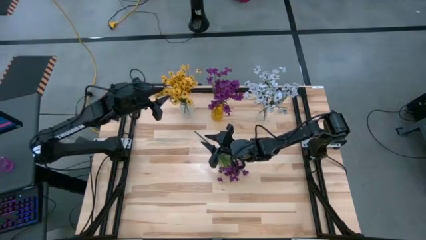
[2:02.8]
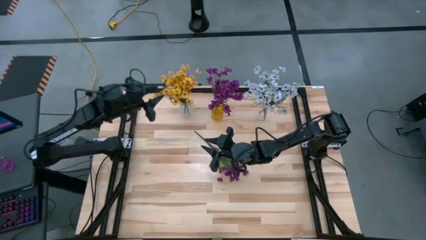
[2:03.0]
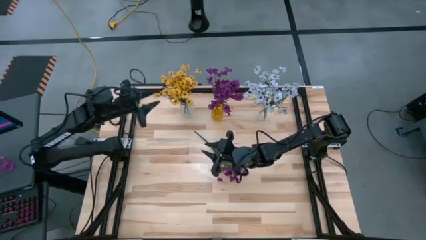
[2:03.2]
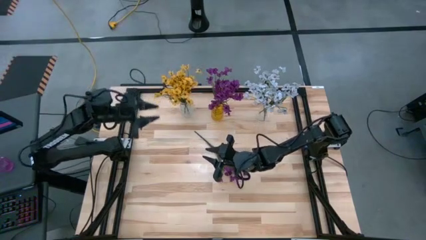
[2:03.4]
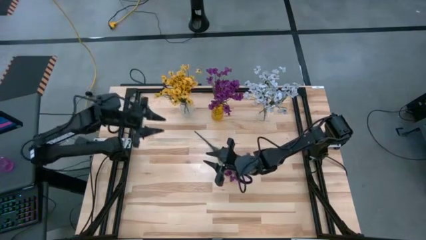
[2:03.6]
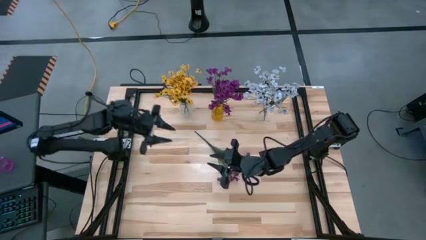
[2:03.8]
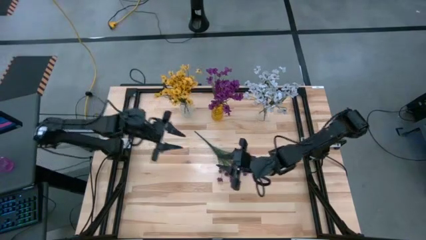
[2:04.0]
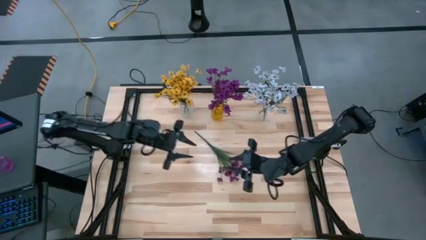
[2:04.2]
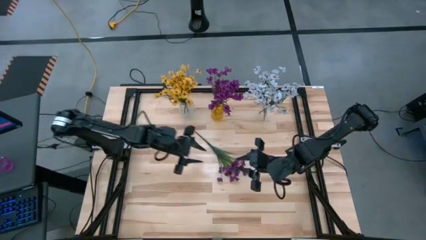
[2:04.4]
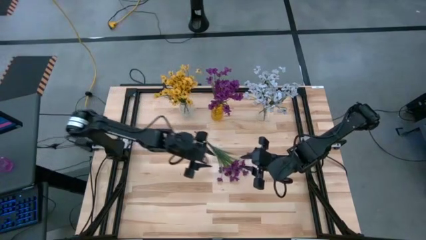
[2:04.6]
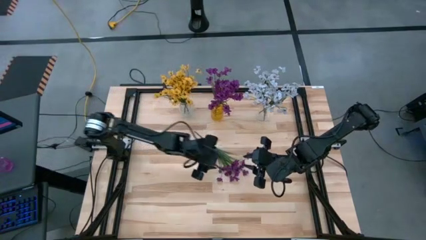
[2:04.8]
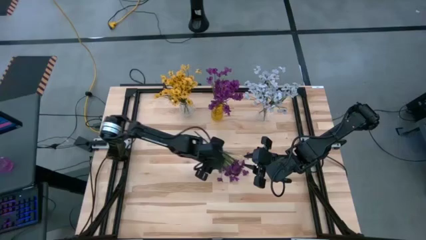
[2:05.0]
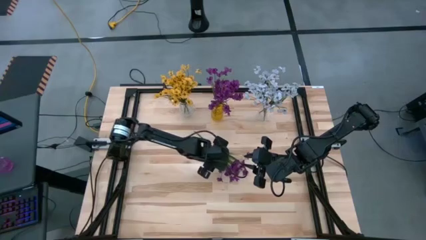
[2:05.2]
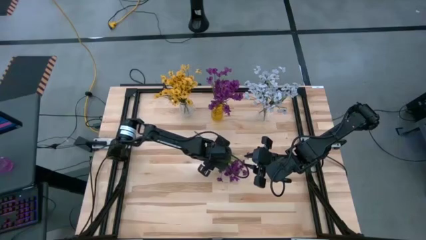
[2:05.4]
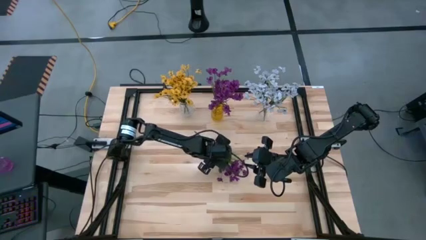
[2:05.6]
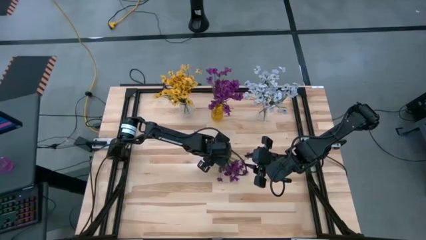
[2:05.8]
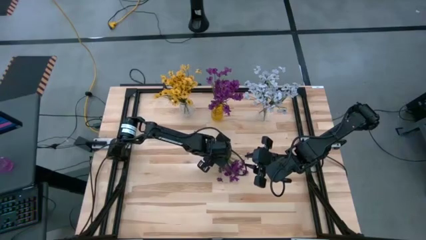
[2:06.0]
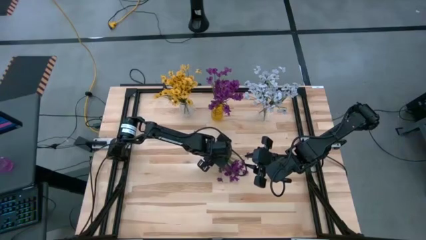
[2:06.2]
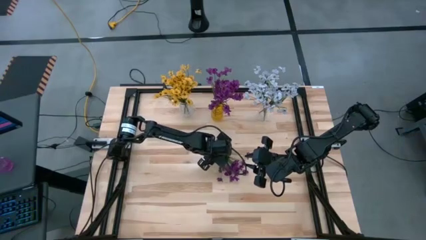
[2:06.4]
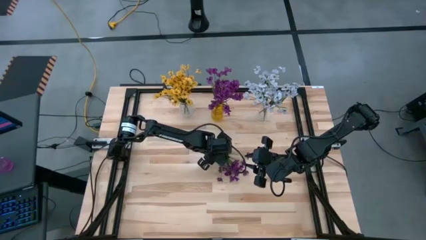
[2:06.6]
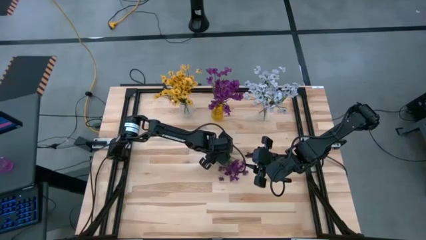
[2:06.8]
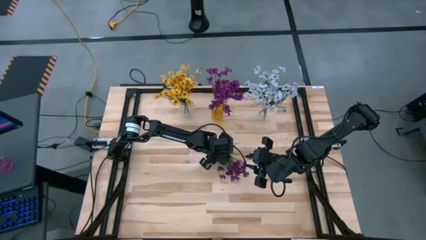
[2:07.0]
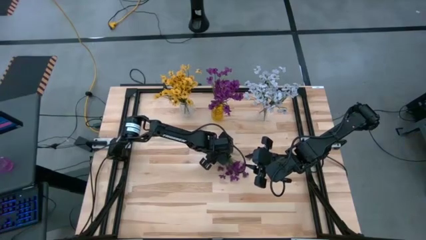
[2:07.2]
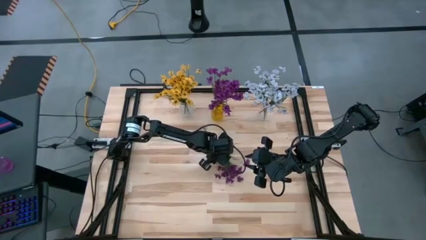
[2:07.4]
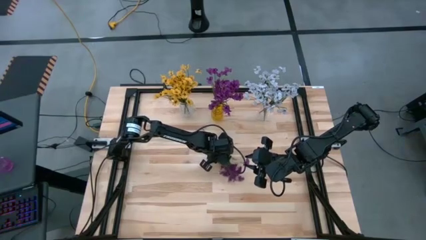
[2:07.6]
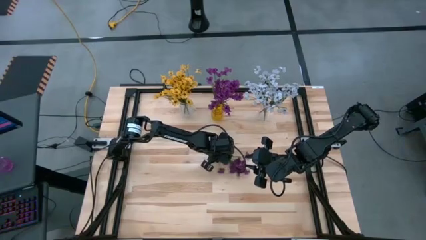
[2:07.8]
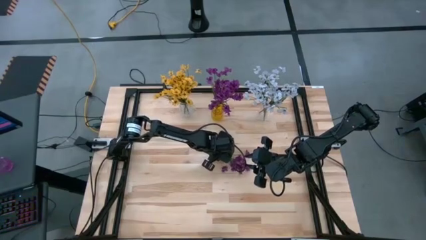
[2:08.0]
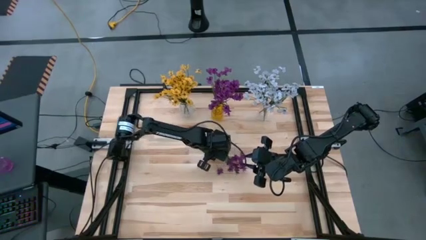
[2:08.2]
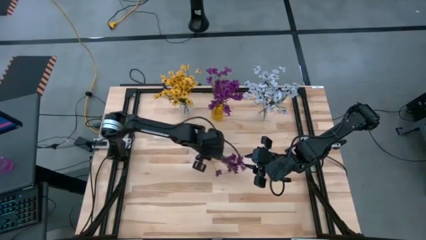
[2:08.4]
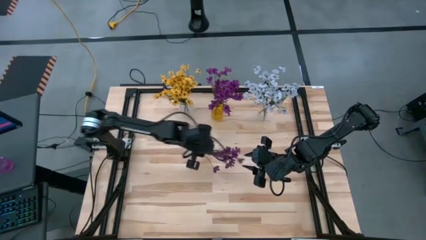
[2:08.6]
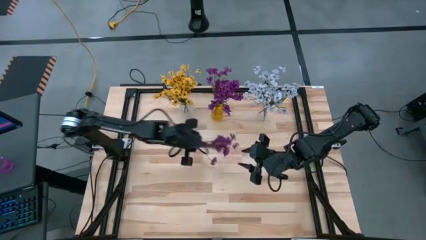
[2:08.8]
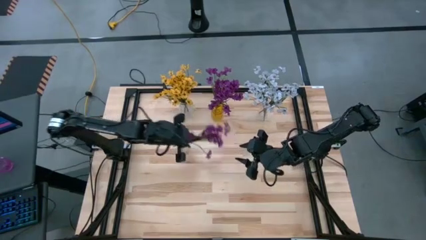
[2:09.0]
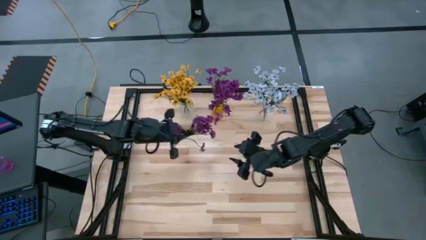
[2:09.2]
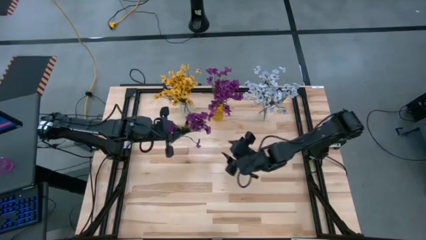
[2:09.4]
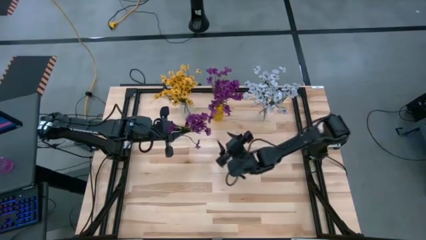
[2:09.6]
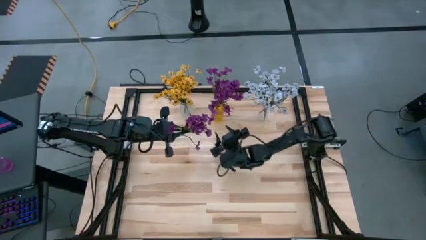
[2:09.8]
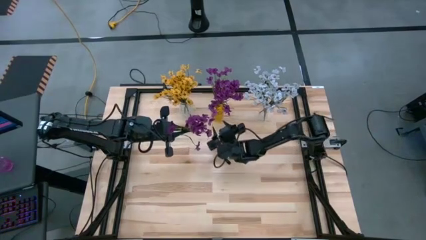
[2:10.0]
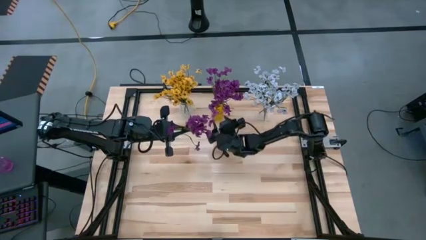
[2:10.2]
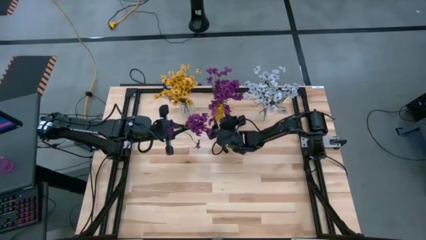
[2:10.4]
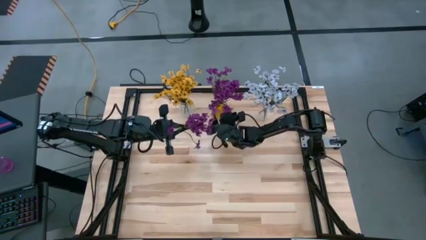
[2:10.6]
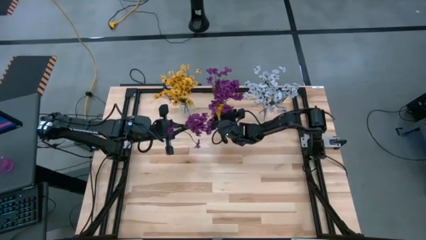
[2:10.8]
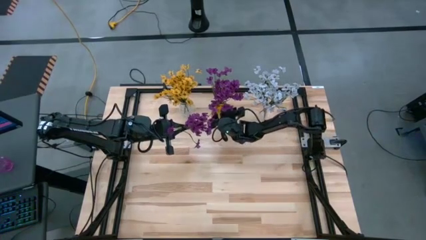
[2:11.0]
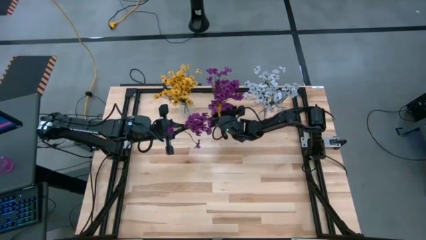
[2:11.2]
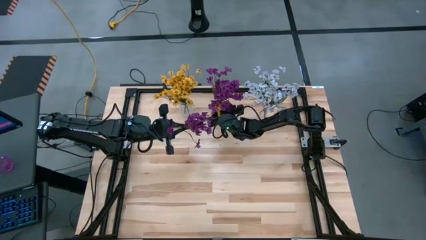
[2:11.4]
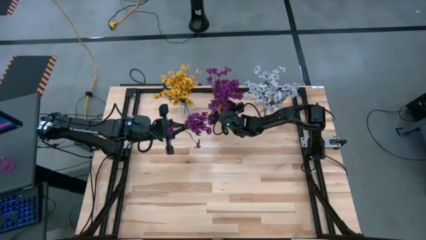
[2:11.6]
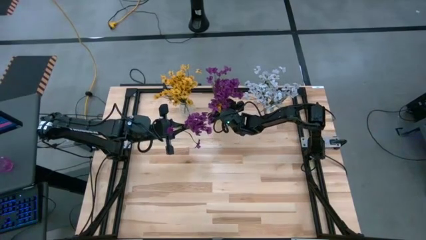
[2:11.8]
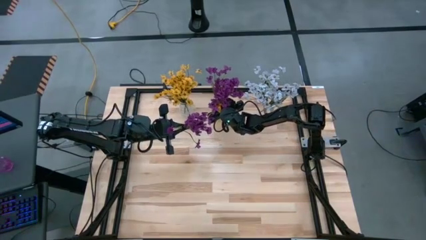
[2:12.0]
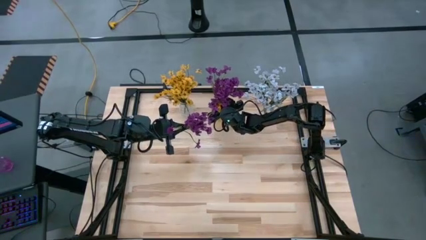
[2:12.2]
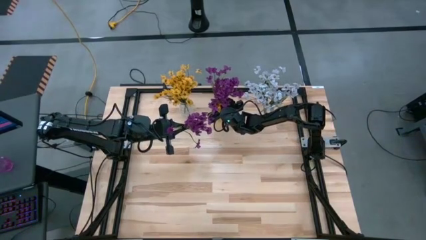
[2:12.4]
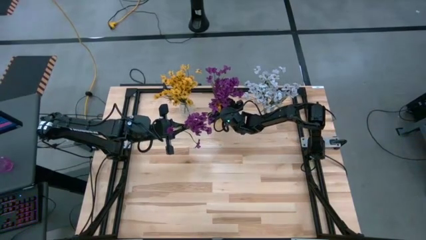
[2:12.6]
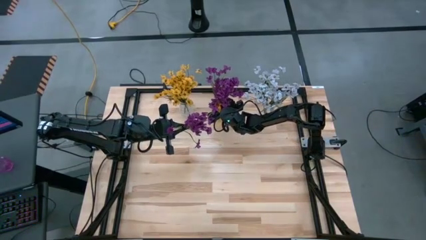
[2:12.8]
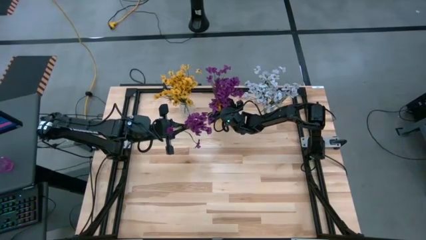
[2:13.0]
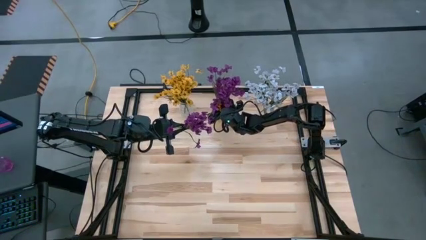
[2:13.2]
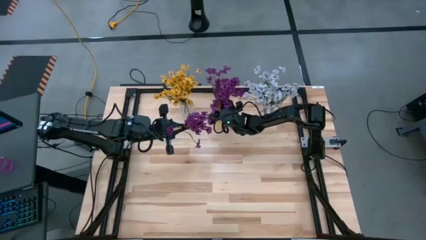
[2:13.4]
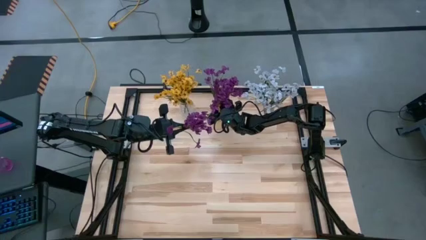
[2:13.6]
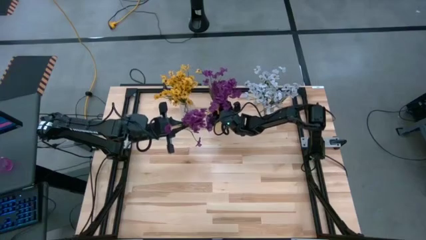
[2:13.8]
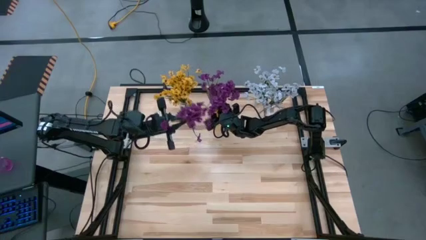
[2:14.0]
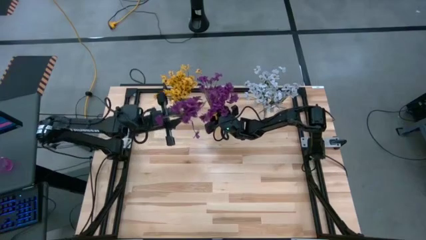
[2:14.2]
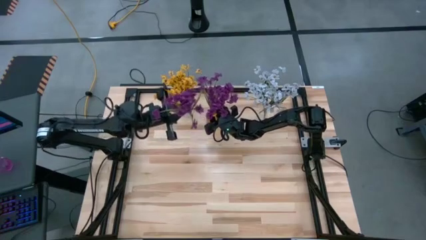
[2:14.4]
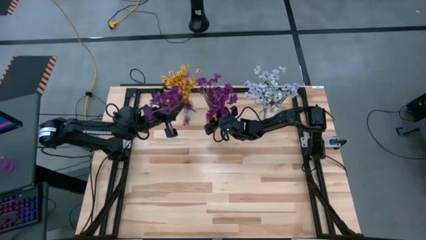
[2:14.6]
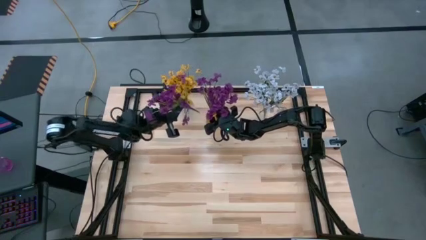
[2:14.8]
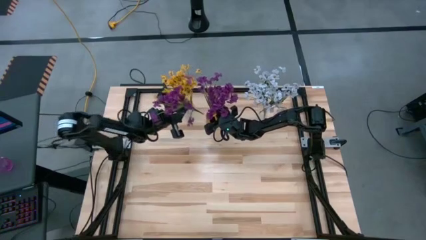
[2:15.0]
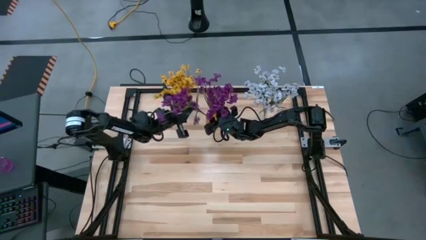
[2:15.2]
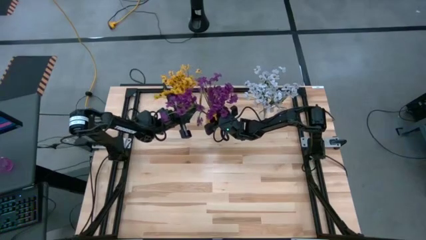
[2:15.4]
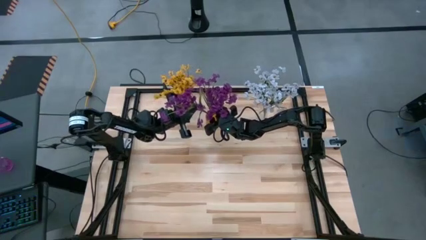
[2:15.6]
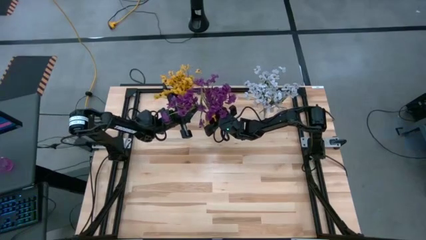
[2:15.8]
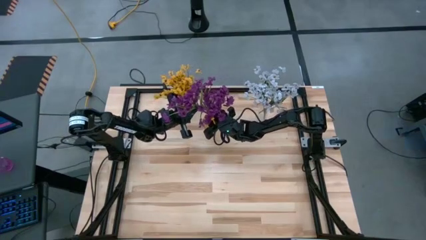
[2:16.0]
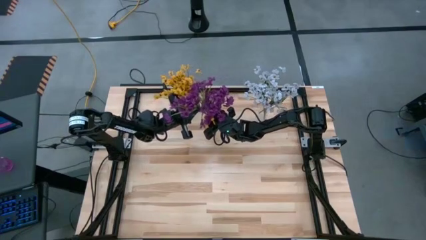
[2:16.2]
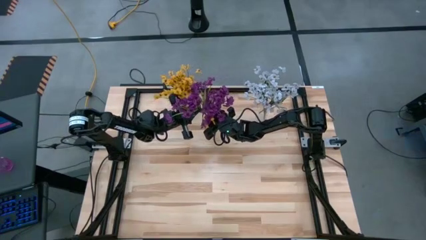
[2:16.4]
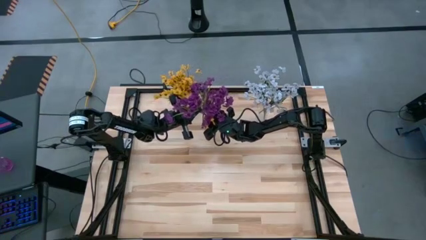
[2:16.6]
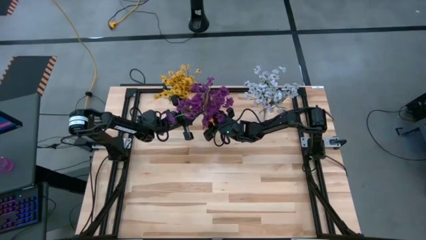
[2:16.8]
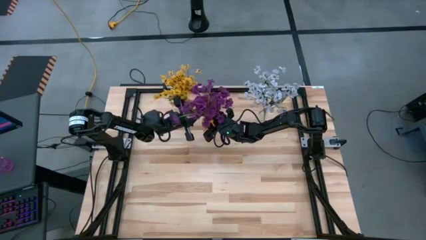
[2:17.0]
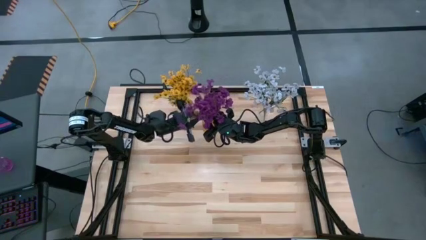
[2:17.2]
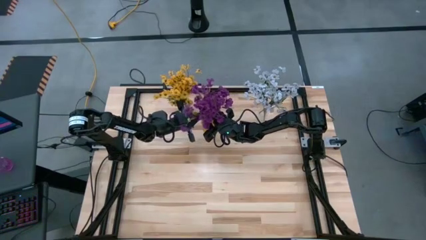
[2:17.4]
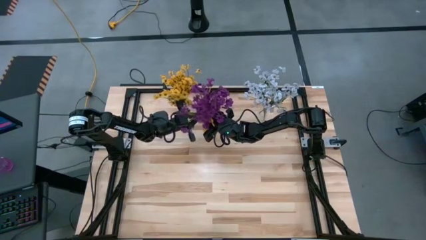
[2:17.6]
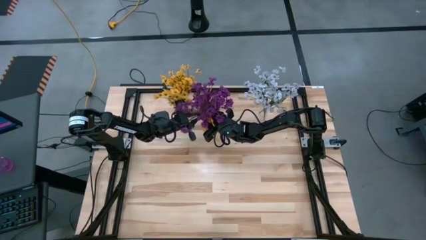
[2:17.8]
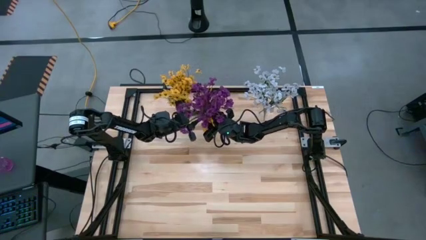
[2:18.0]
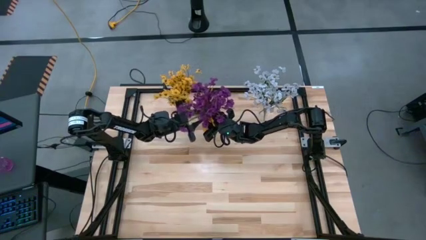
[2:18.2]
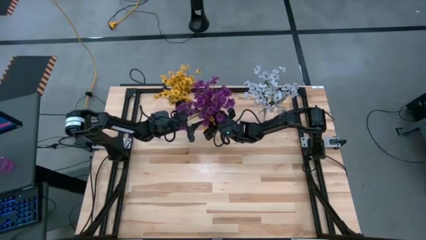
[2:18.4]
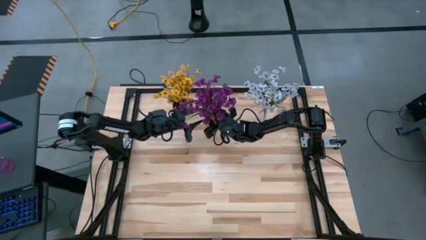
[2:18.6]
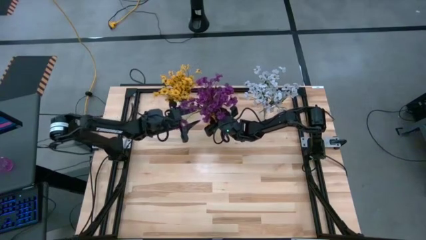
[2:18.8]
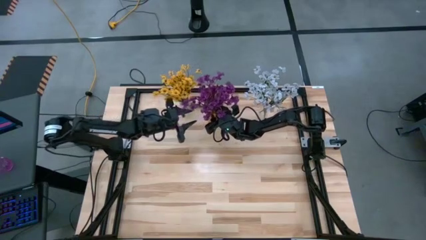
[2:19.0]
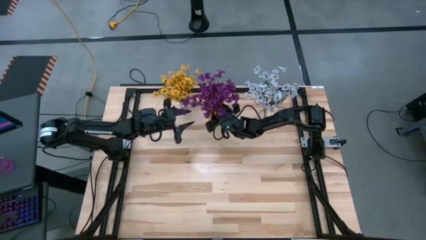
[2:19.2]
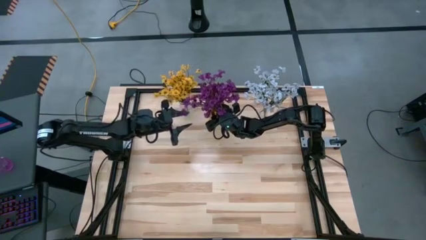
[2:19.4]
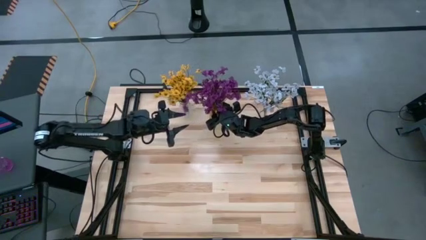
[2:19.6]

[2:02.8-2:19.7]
Task: Sort flowers into vase by color
Put the purple flowers into the yellow vase
